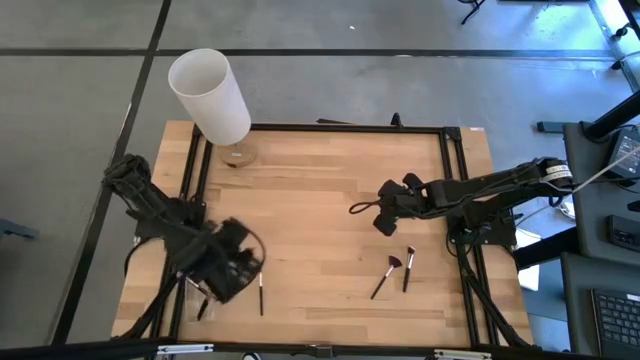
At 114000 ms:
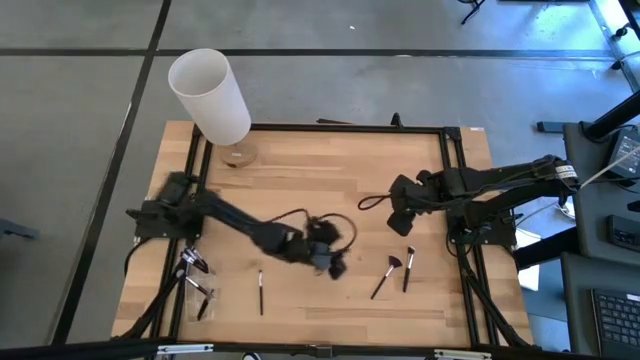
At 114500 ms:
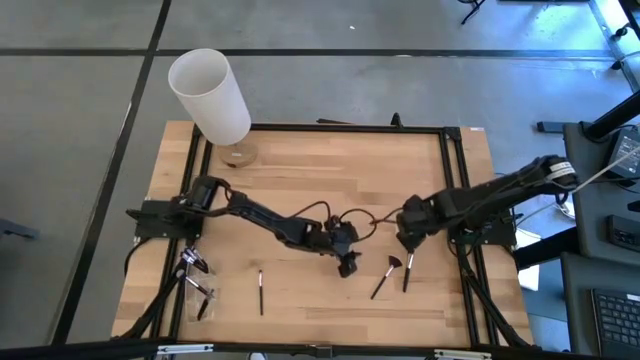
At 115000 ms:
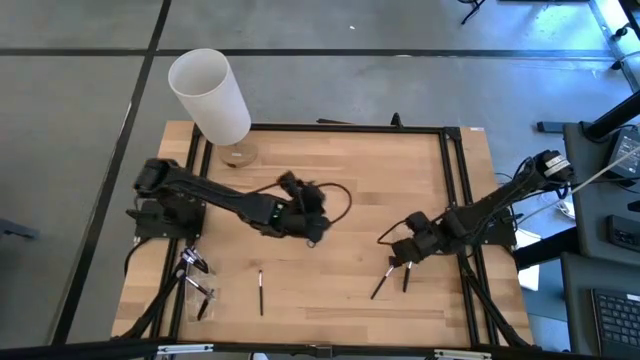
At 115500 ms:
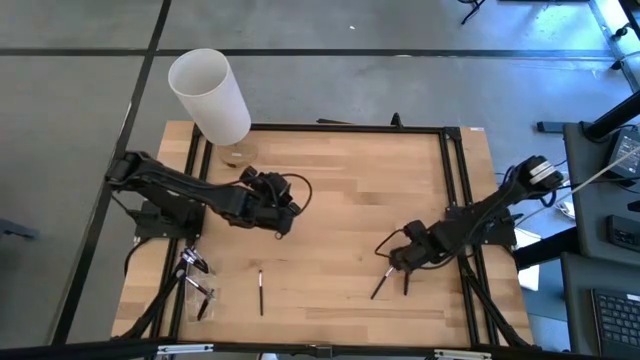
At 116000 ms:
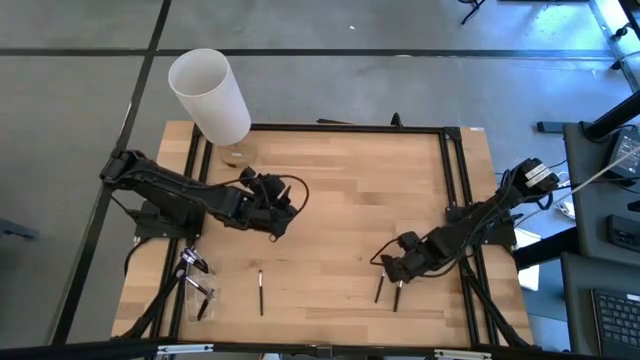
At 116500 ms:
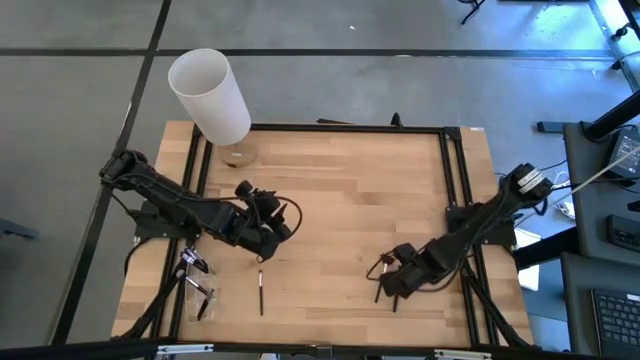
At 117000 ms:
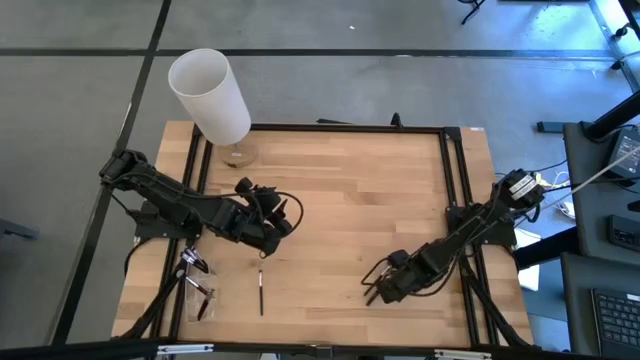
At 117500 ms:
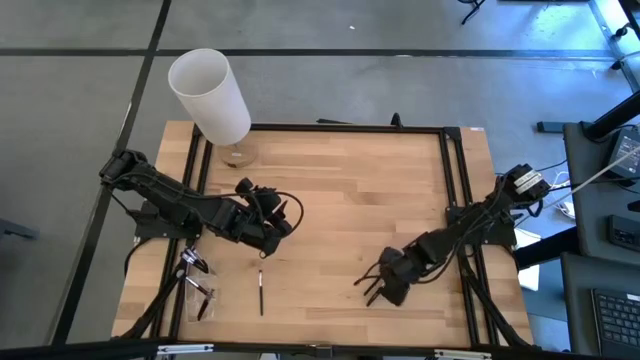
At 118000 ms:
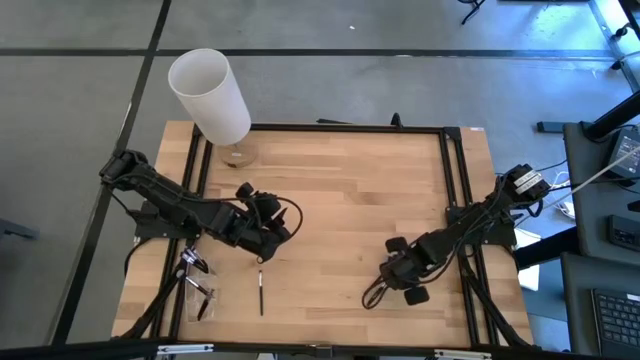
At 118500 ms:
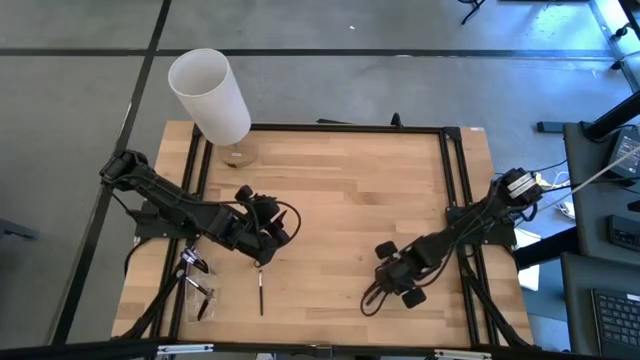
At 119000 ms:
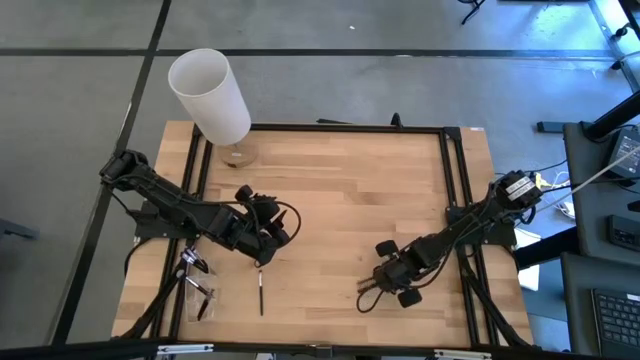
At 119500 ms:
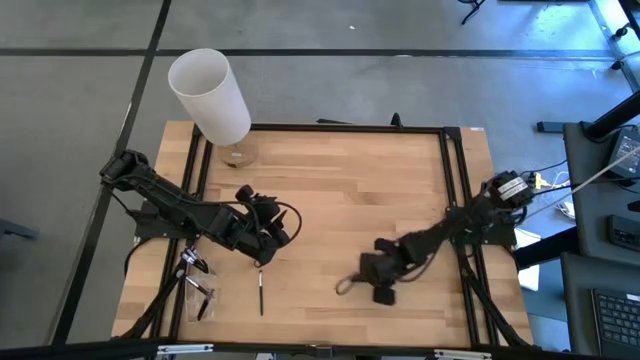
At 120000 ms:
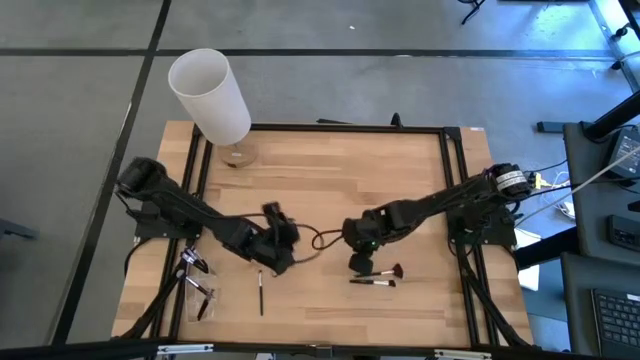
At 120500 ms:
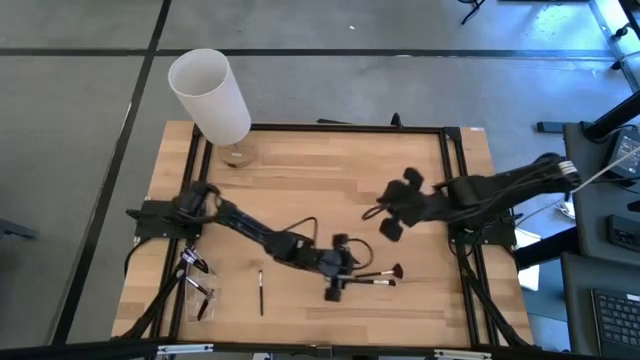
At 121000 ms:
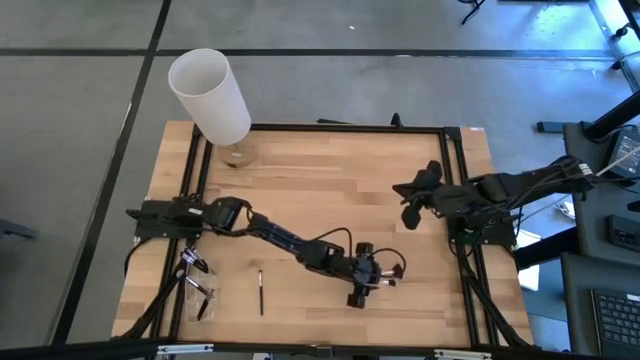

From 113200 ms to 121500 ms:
Task: Put items in baskets/containers
Put the blush brush into the transparent organizer

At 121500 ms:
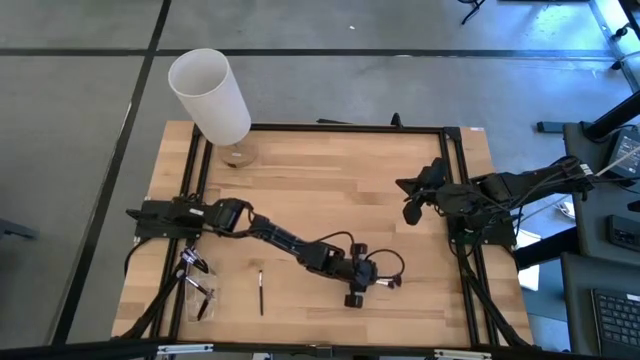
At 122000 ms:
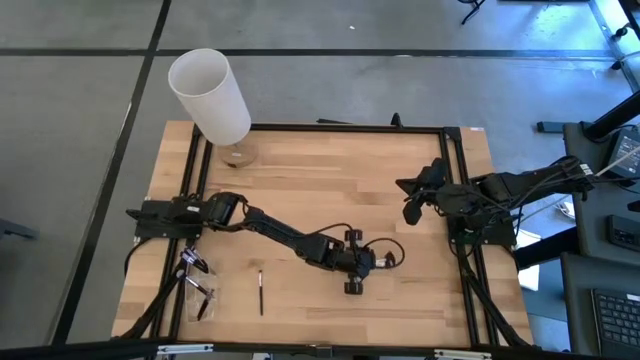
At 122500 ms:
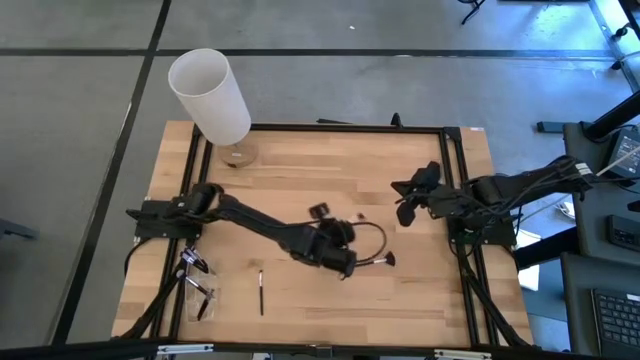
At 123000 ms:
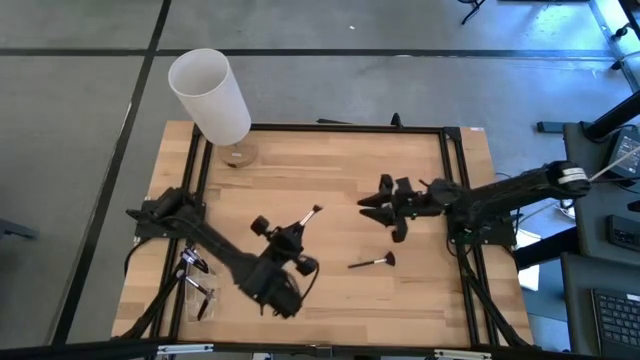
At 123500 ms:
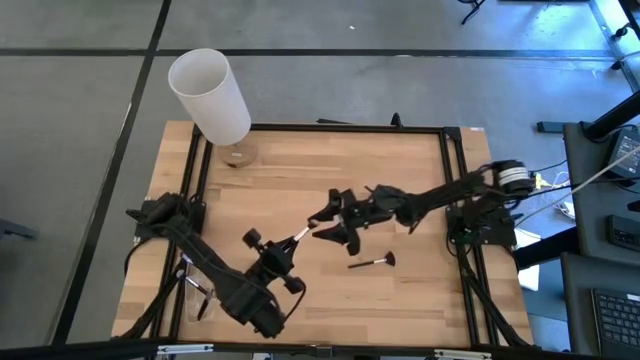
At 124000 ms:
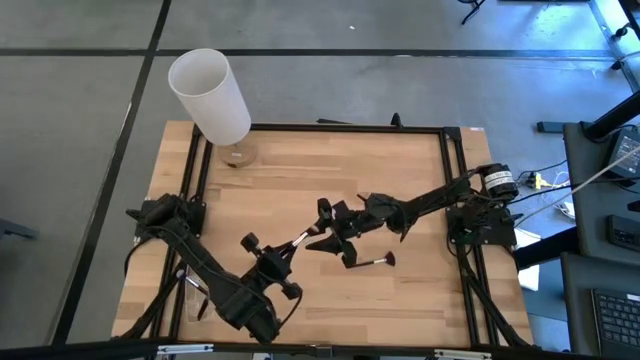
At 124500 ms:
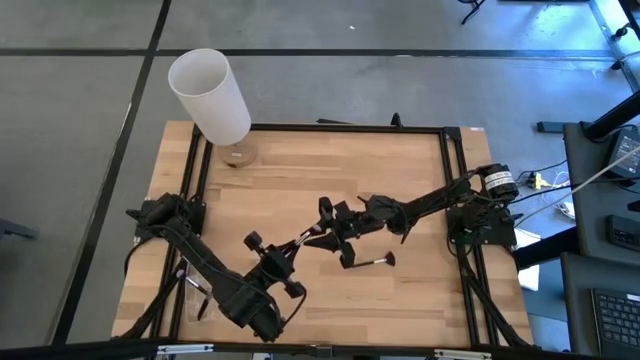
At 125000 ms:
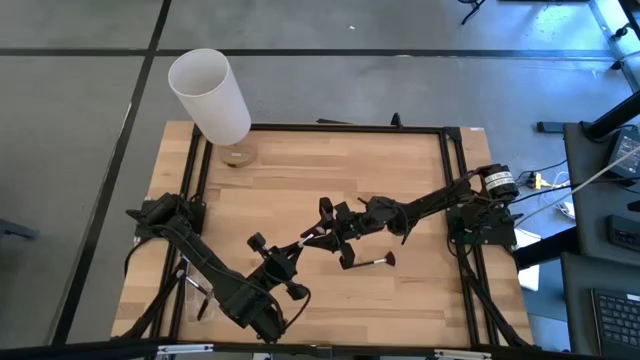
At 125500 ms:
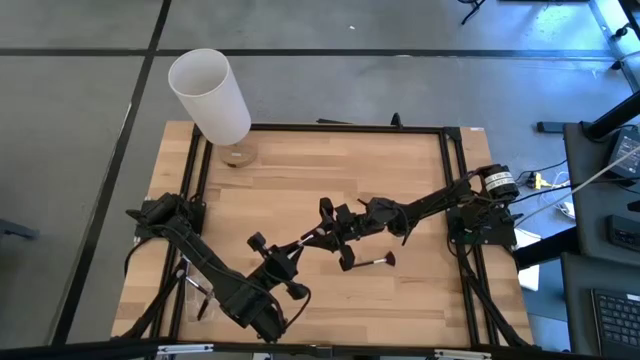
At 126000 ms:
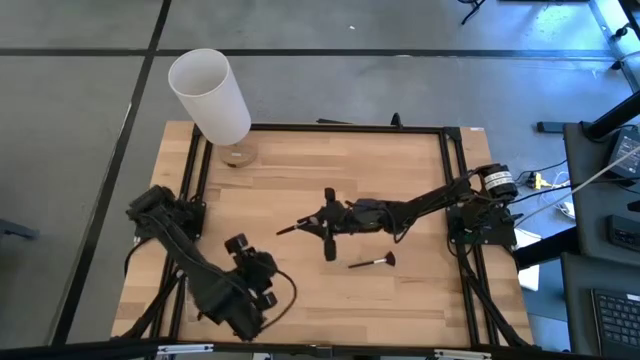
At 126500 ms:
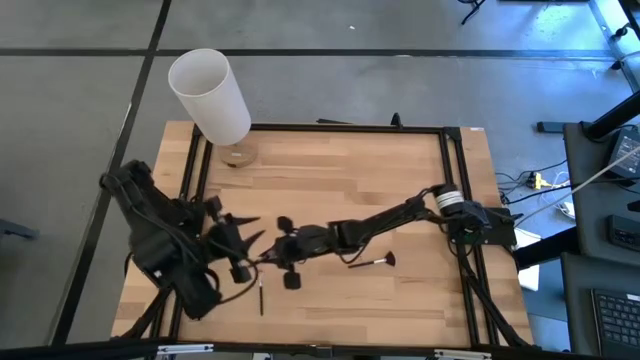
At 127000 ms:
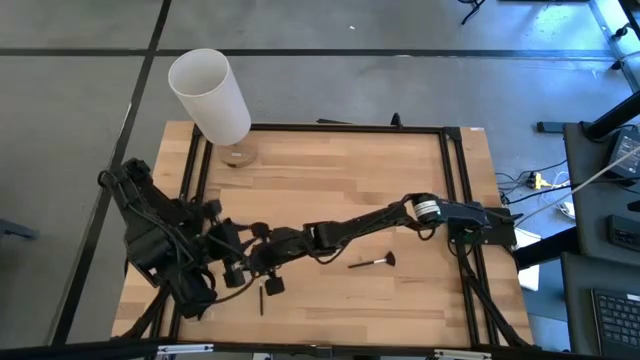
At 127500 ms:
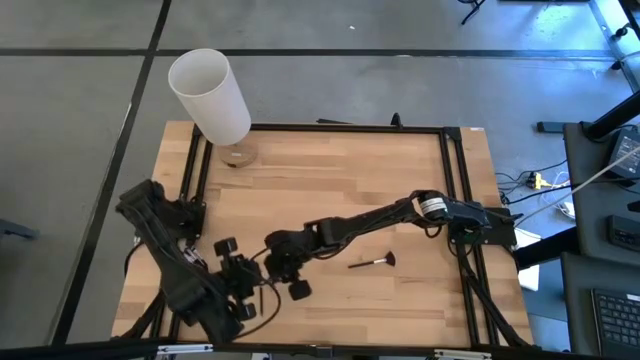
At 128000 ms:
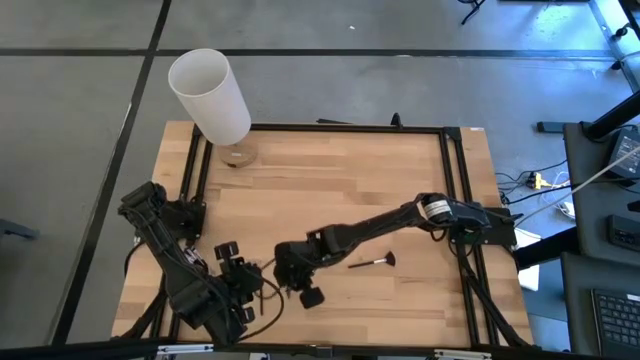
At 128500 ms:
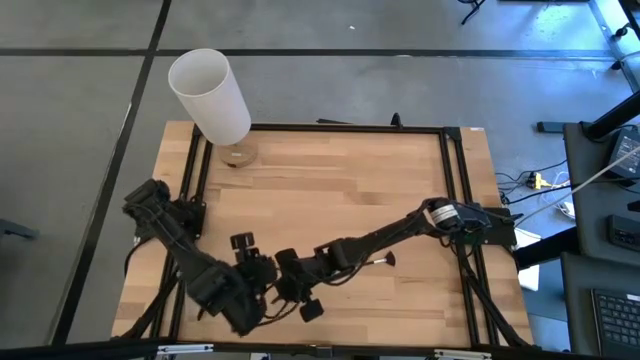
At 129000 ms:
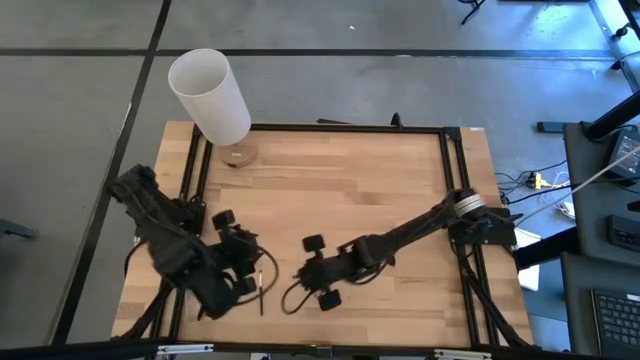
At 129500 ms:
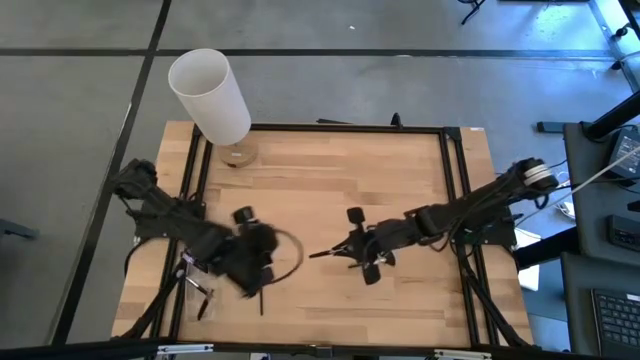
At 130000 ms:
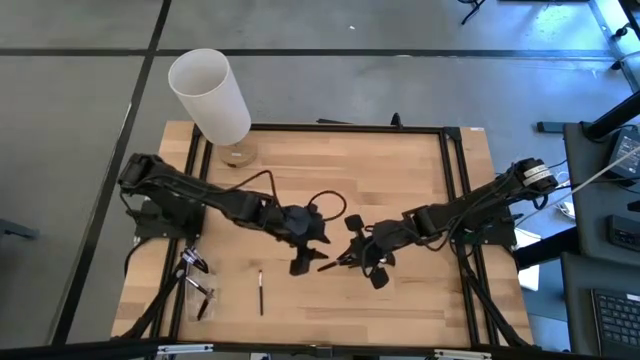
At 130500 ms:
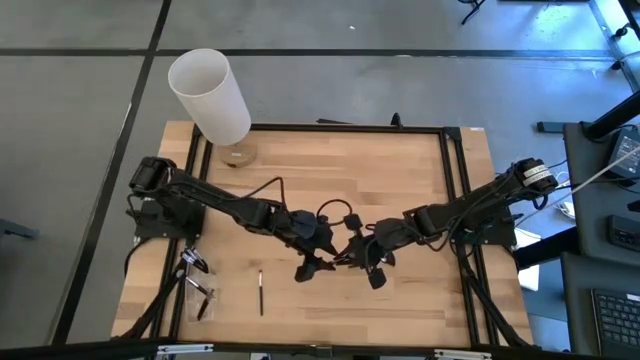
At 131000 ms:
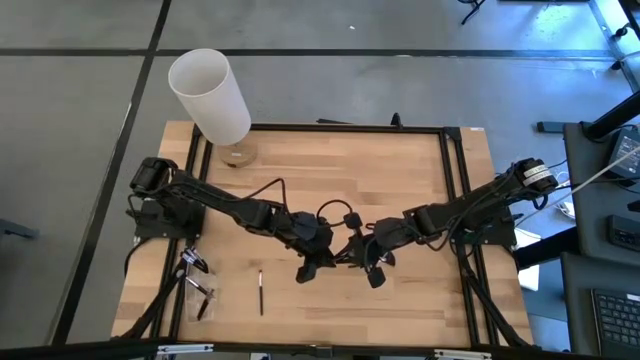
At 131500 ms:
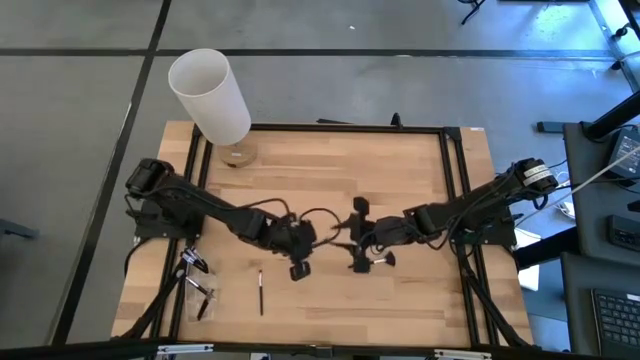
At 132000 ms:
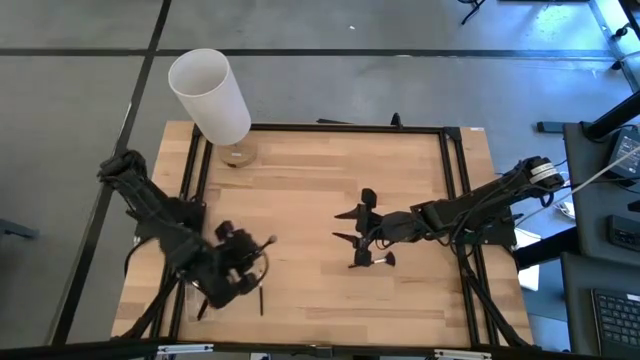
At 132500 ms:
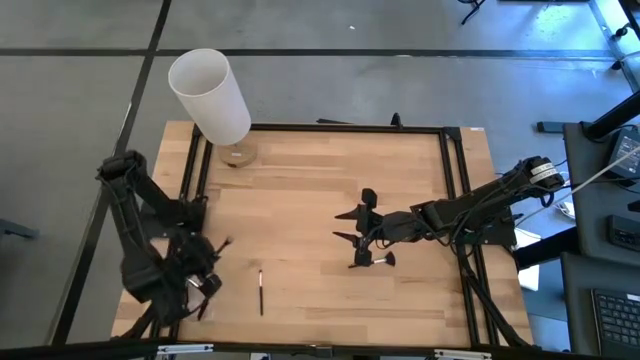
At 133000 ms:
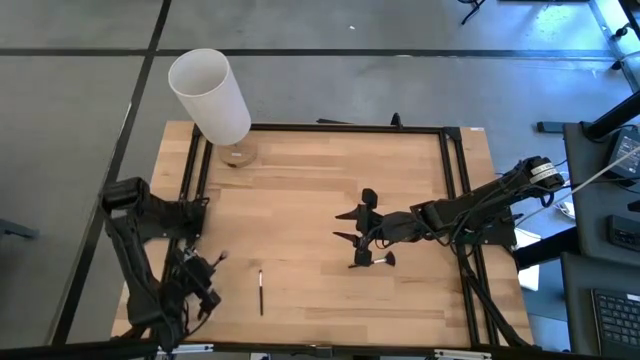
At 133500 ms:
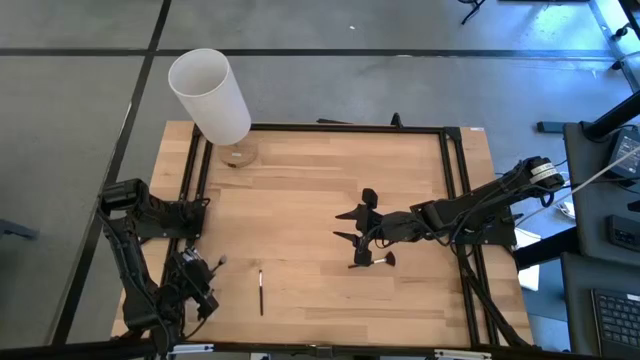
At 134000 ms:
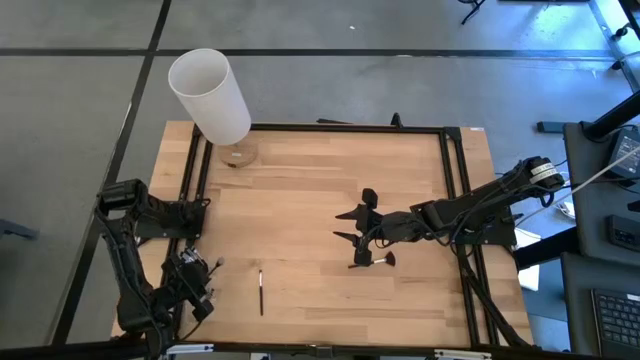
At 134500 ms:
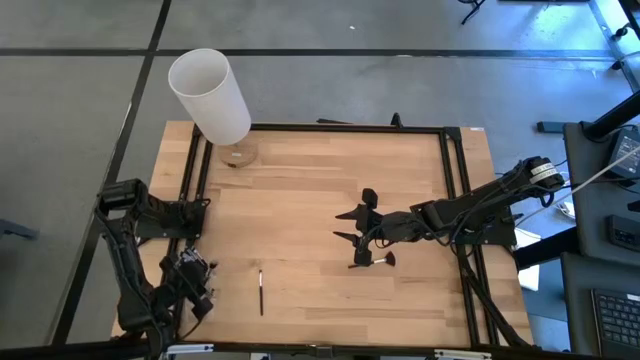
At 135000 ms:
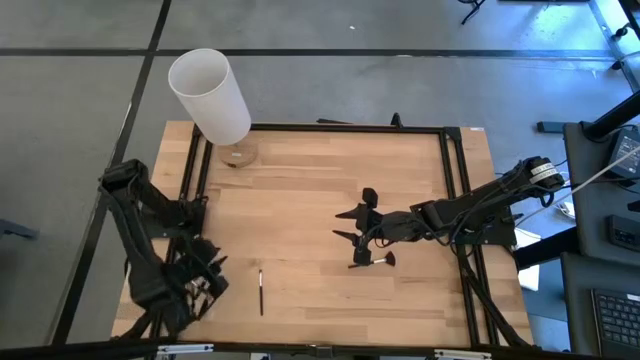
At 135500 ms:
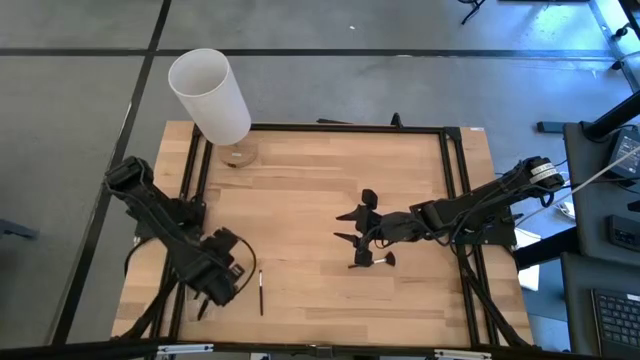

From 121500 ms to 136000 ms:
Put the blush brush into the transparent organizer

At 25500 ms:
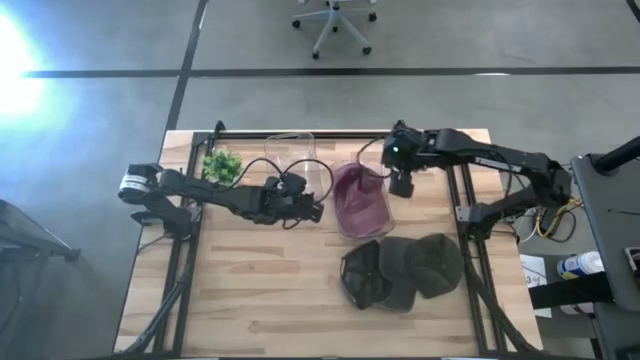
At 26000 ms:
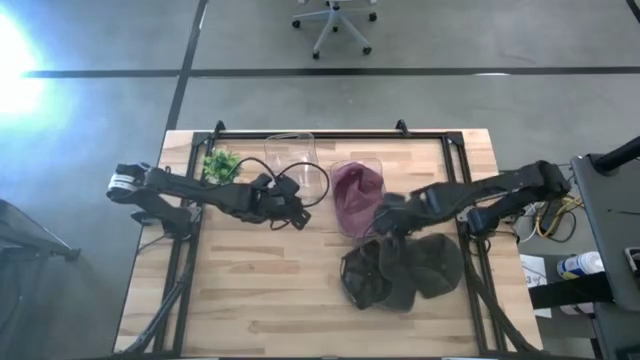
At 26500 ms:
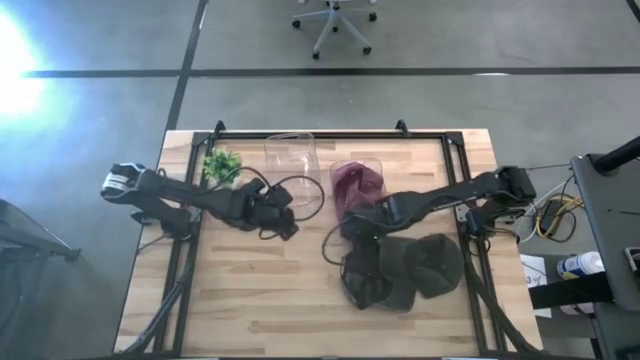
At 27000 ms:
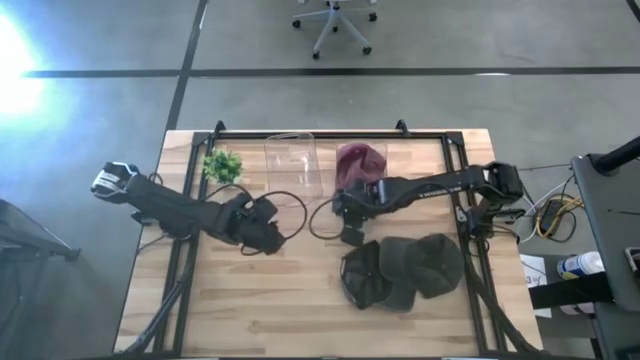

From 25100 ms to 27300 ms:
Task: Pick & Place hat
Adjust the right transparent bin
